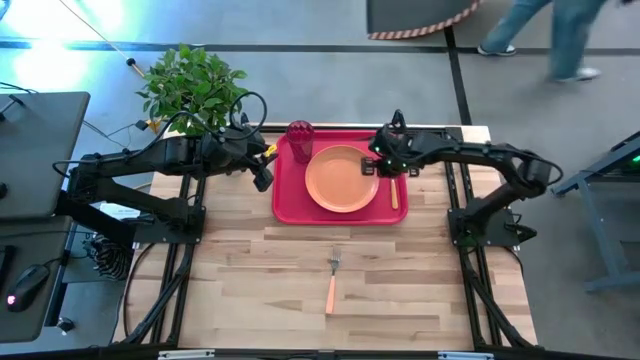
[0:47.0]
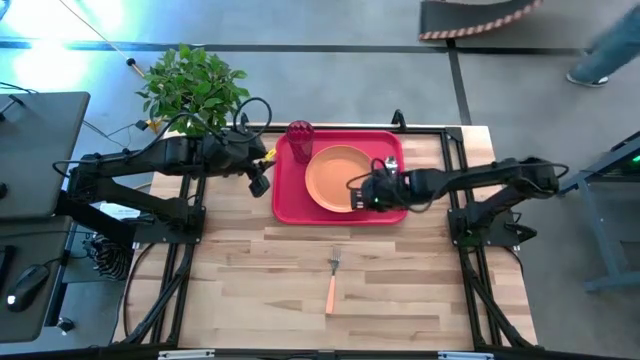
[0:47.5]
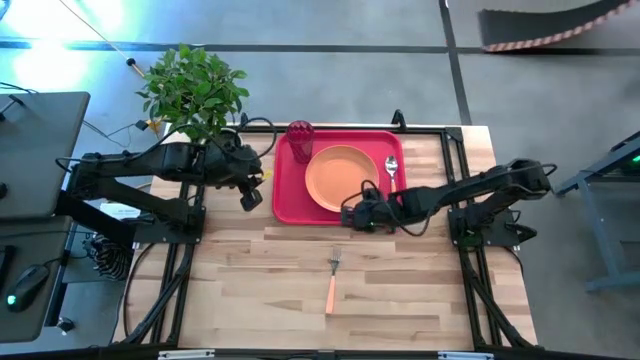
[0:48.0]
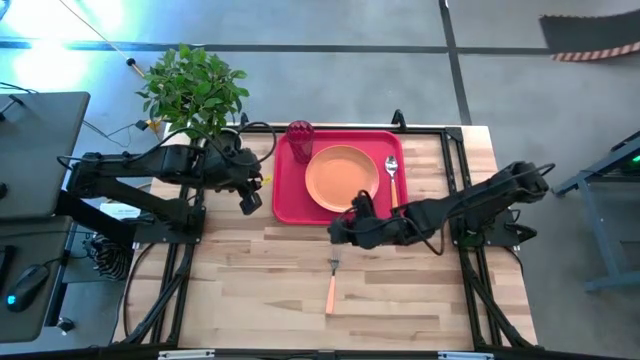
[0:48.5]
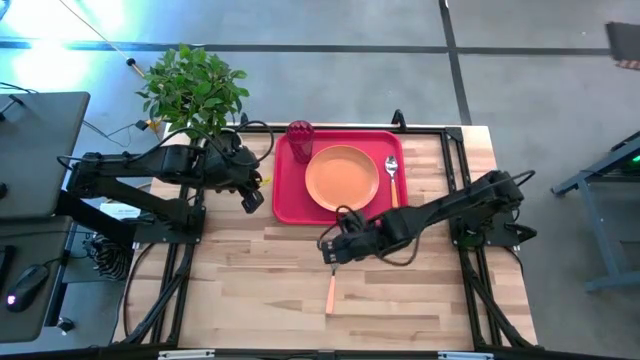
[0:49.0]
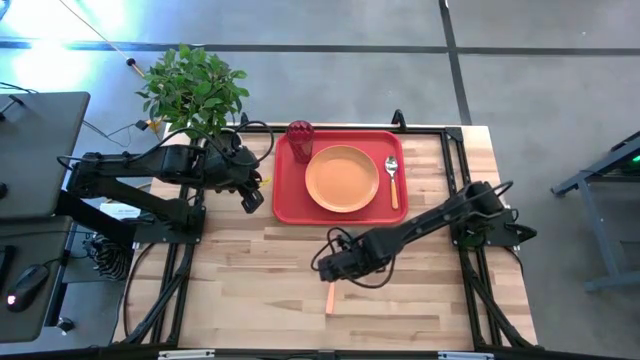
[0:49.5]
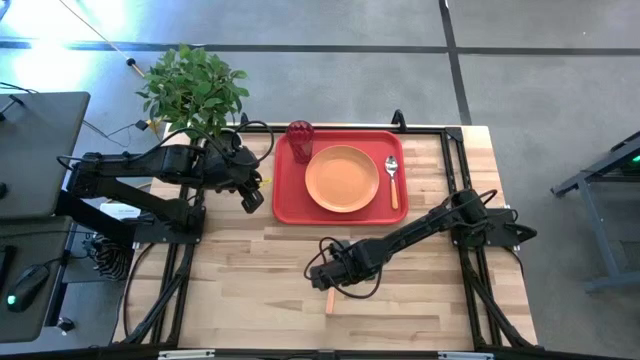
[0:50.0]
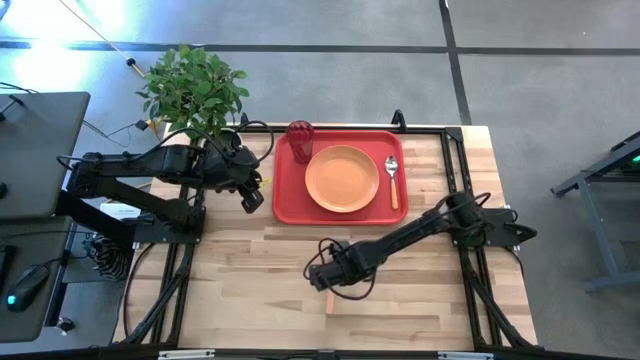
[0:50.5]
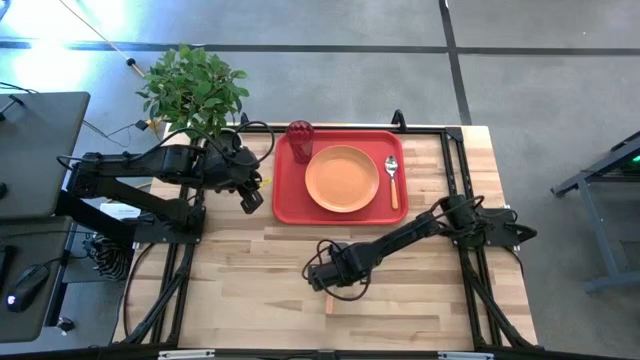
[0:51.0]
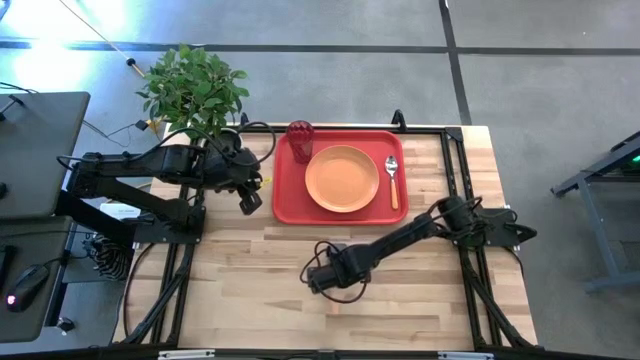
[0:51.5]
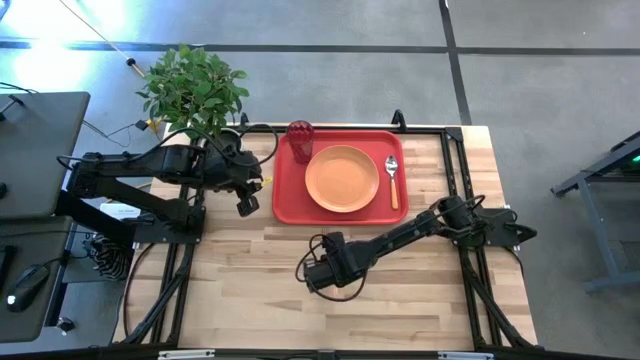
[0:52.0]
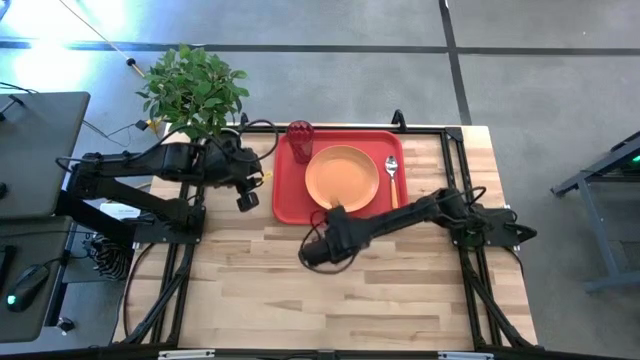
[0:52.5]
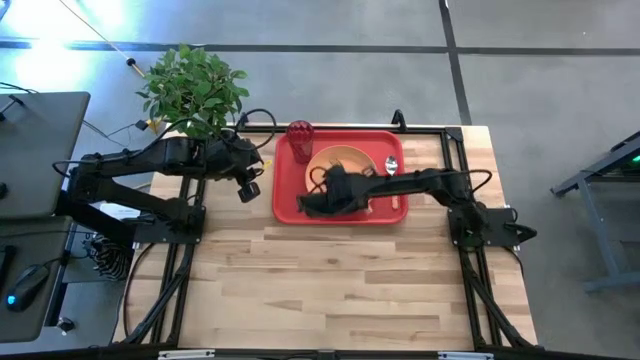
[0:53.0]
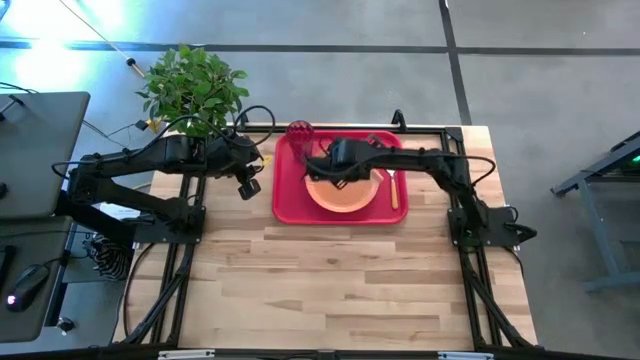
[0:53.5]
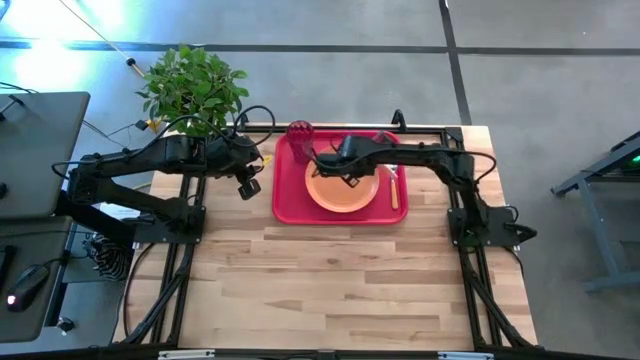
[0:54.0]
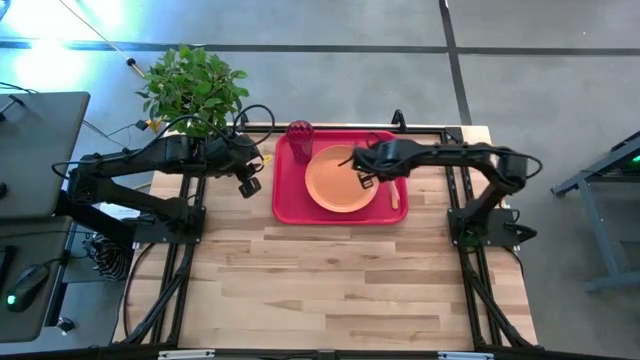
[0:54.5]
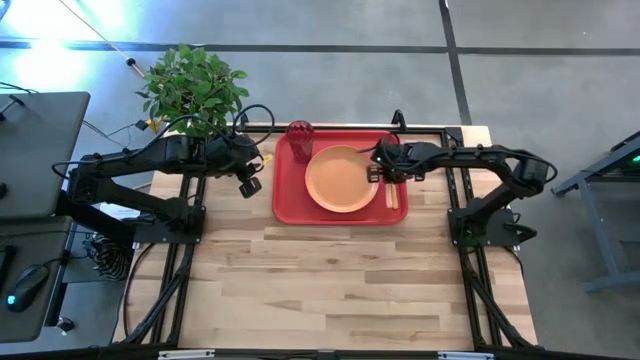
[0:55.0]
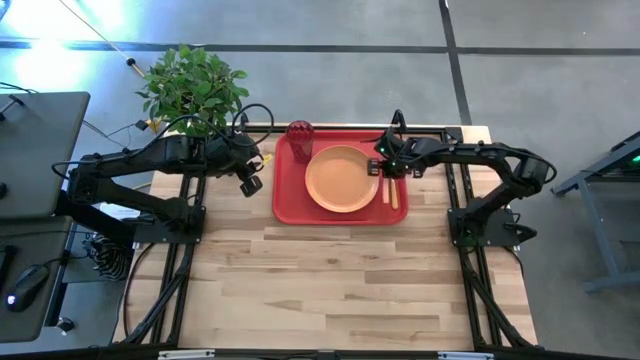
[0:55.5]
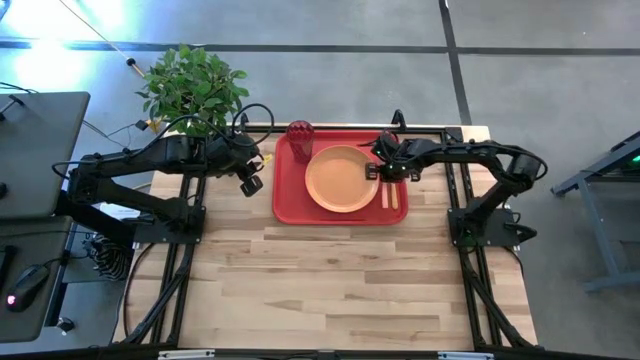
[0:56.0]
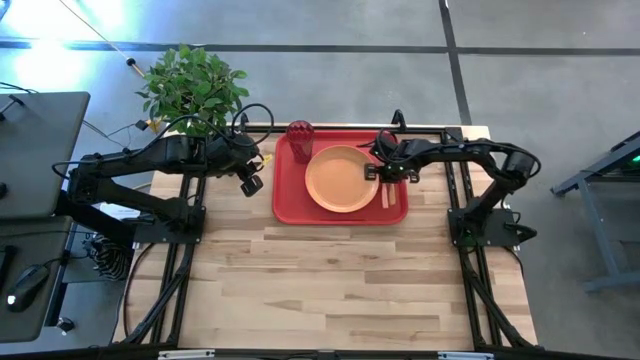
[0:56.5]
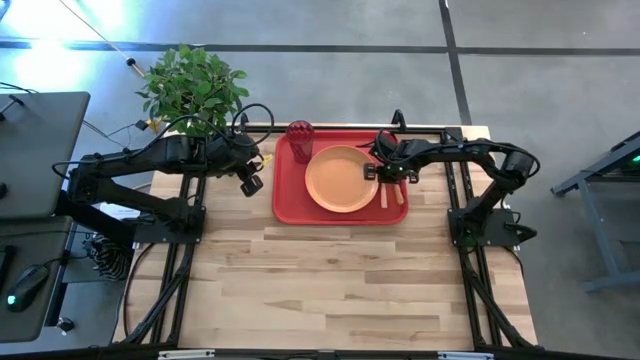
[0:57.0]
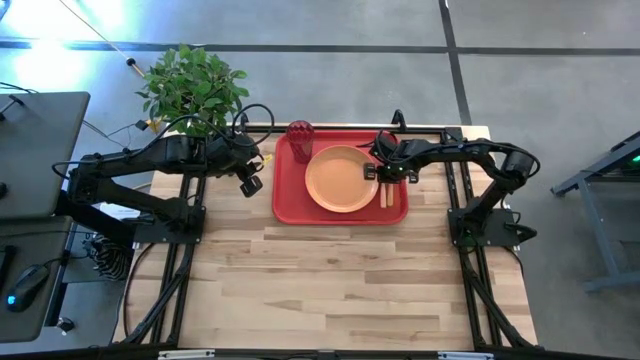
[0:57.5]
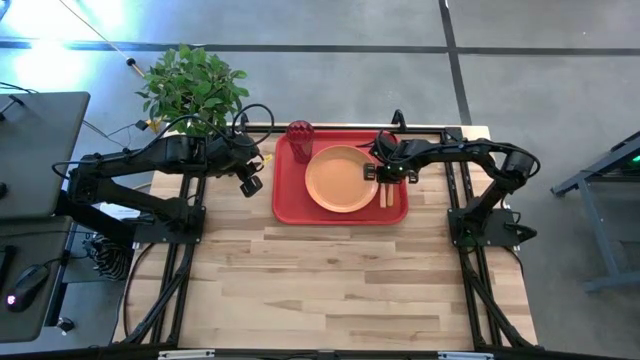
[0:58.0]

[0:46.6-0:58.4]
Task: Pick and place plate/cup/fork/spoon on tray
Put the orange fork on the red tray to the middle of the orange plate and yellow spoon

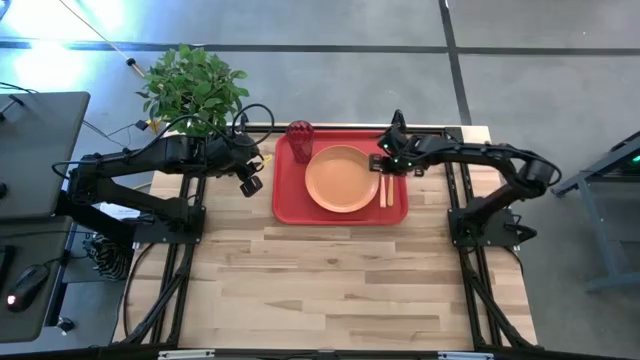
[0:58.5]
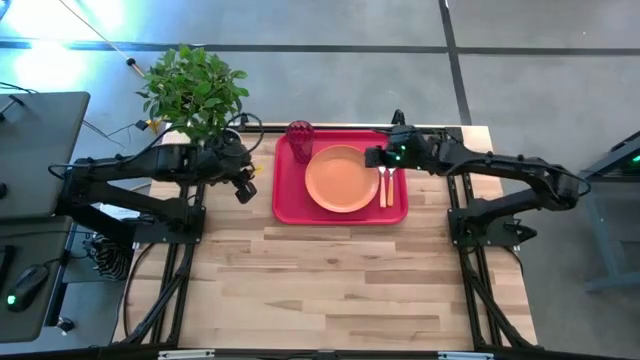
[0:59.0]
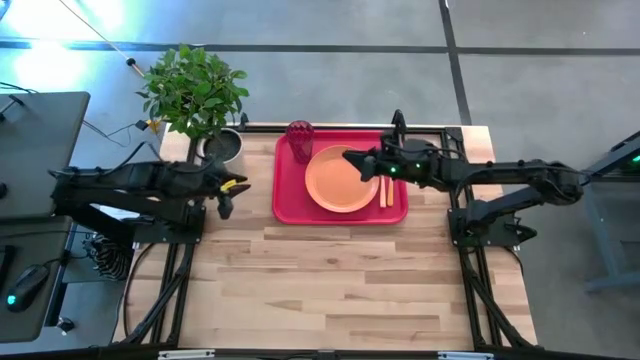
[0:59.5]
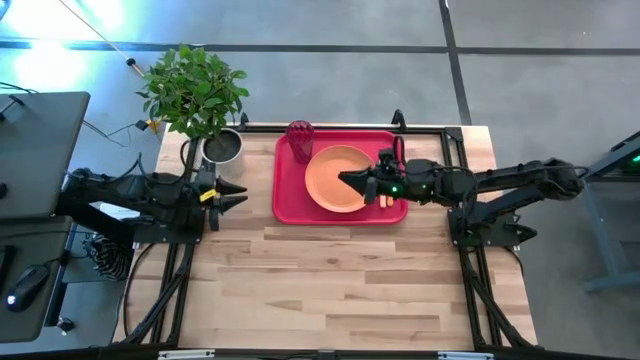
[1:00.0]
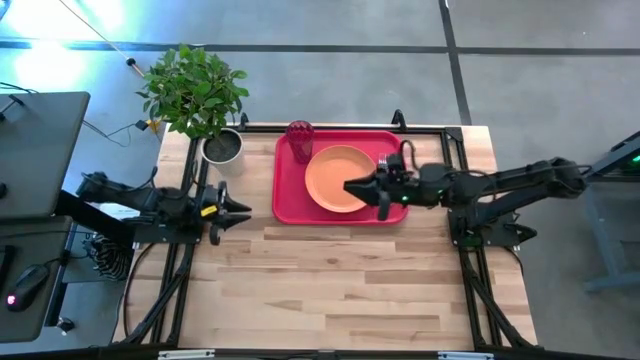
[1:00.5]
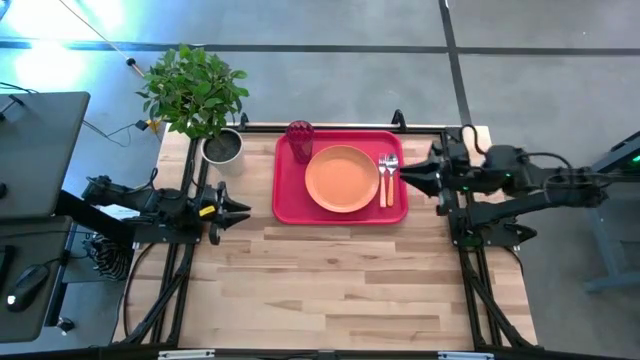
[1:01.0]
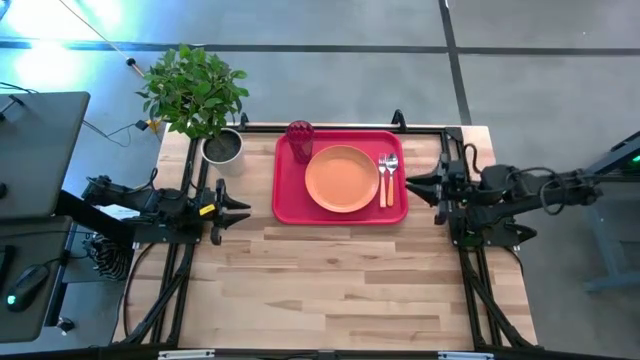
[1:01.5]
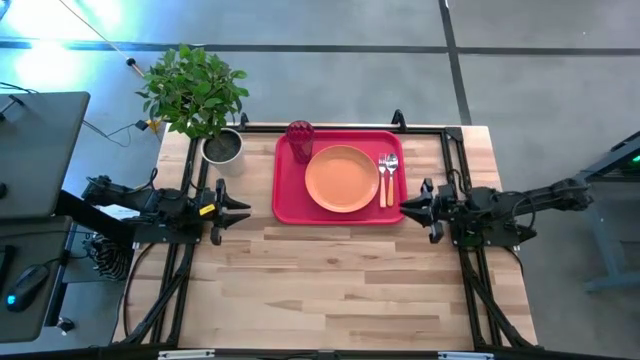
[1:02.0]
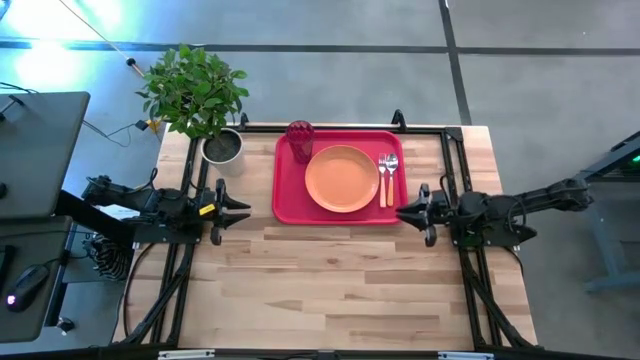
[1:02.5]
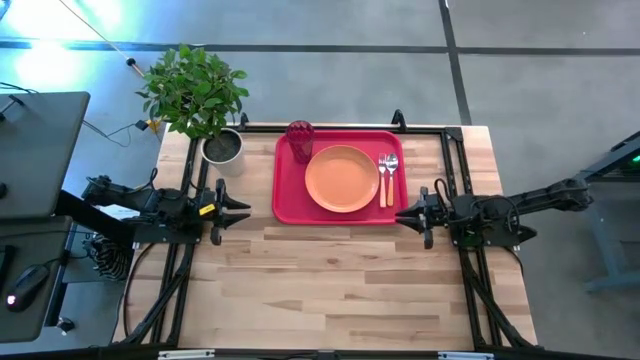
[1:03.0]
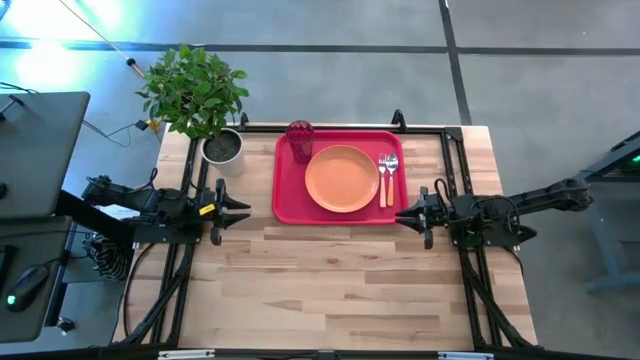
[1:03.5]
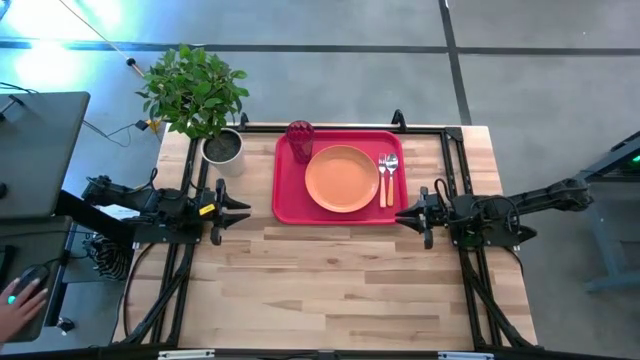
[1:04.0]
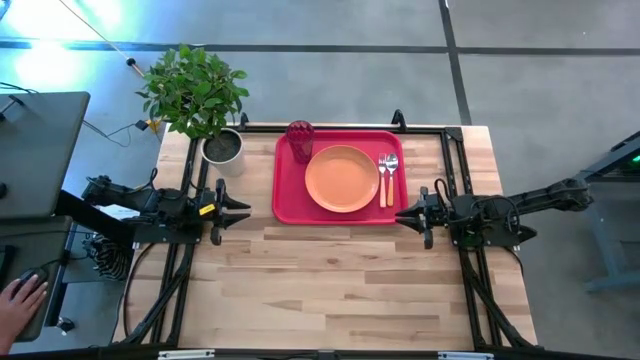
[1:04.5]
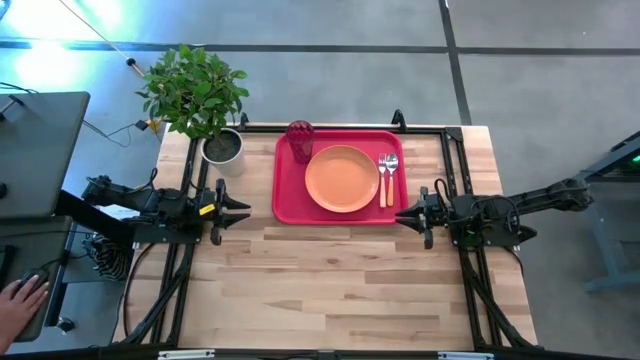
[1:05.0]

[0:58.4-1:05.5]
Return to Home Position

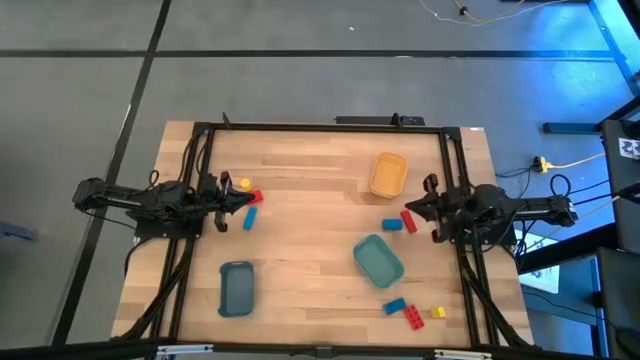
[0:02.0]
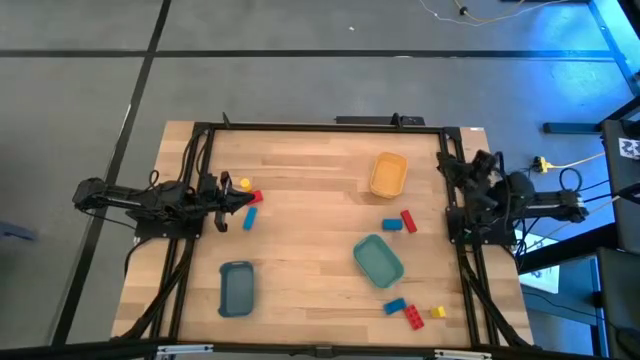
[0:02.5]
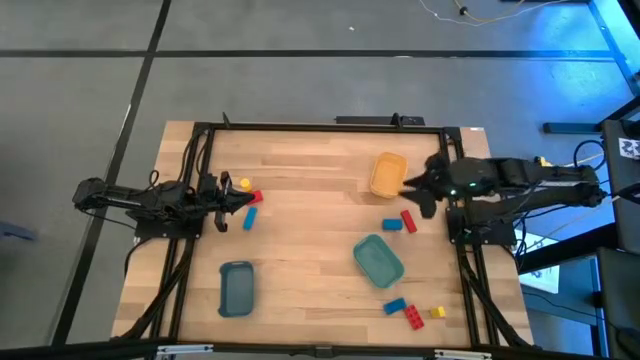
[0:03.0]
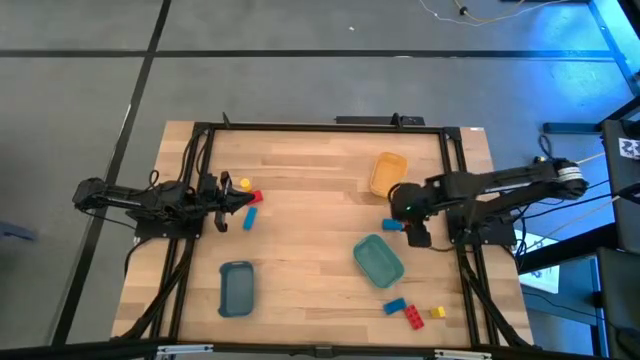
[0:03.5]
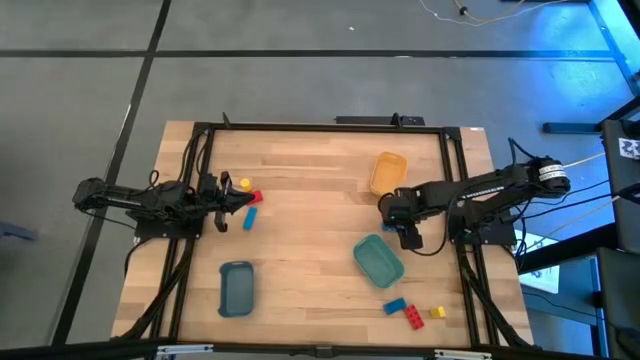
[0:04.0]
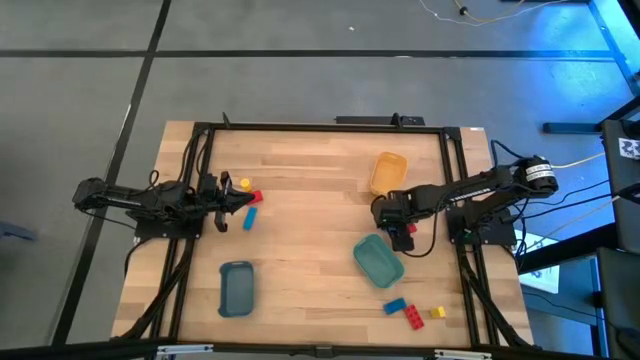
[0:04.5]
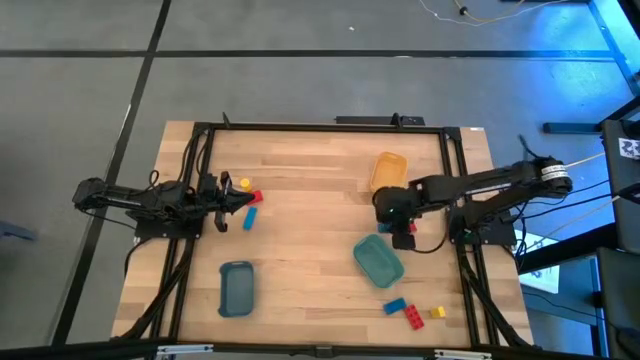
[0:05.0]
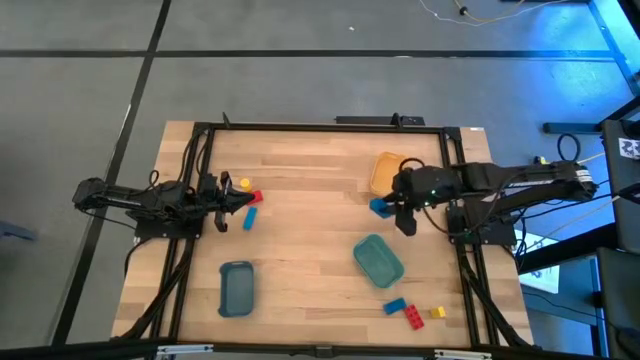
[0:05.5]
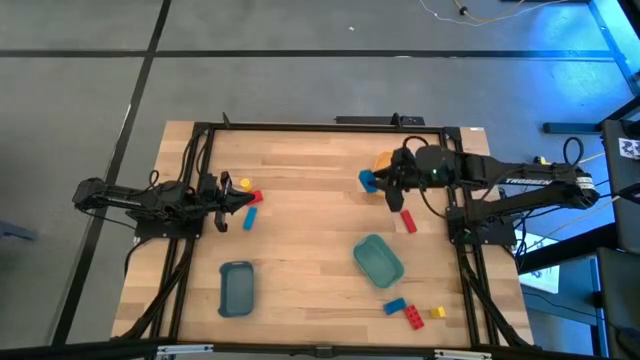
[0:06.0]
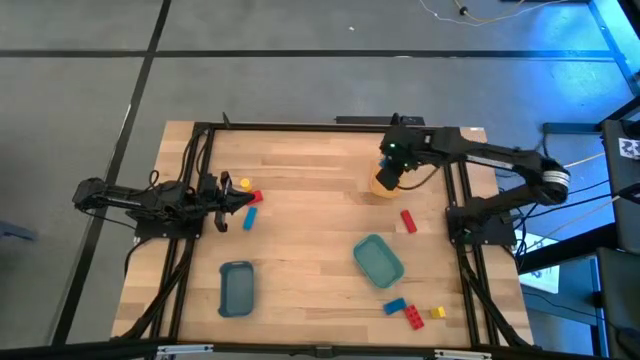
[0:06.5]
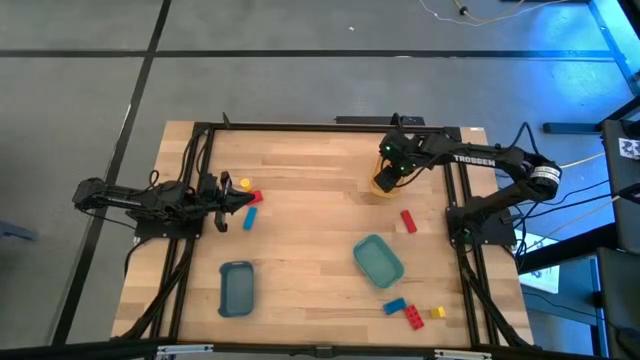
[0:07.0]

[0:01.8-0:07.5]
Task: Sort & place blocks by color
Put the top right blue block into the yellow bin
